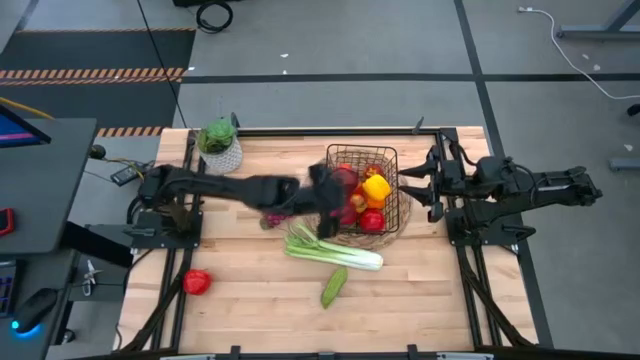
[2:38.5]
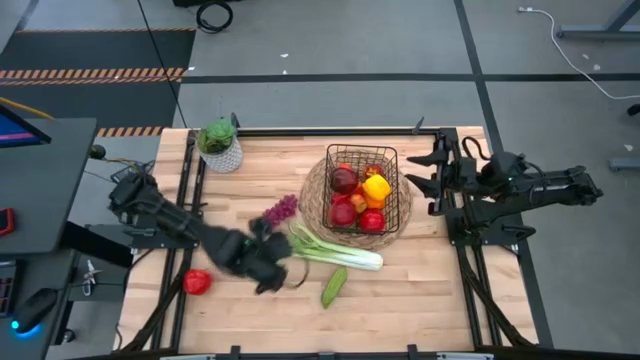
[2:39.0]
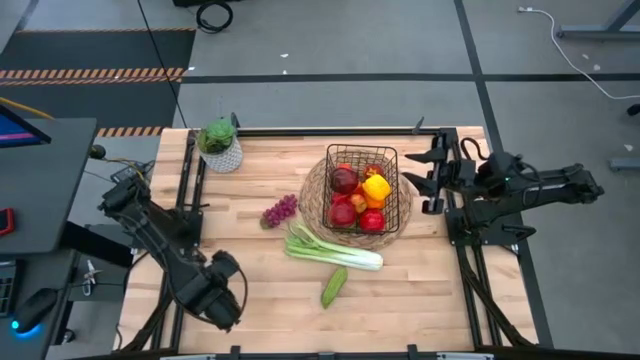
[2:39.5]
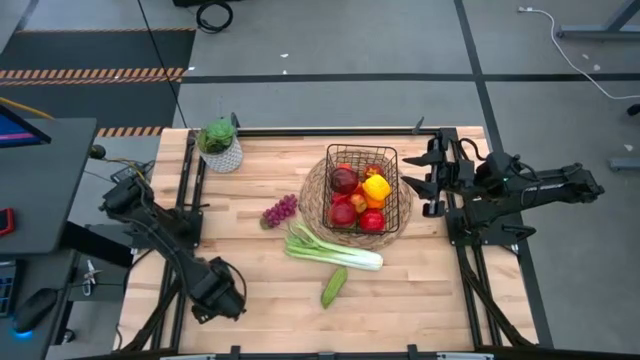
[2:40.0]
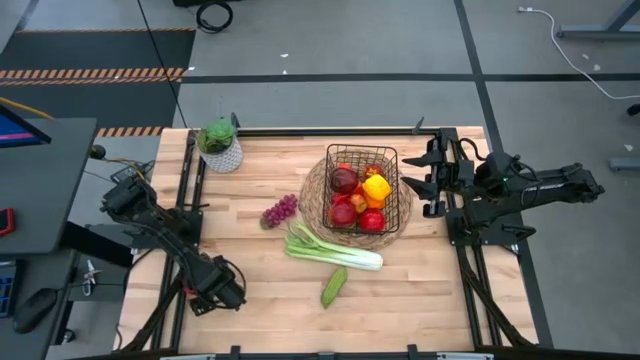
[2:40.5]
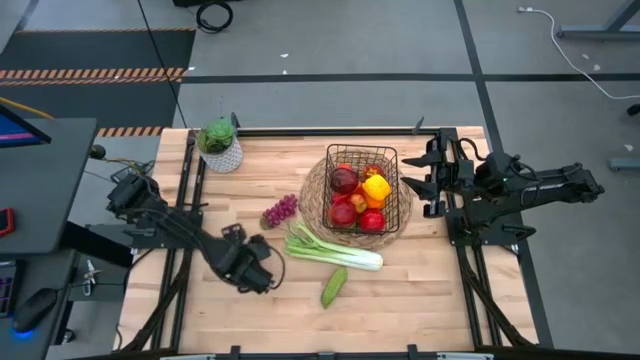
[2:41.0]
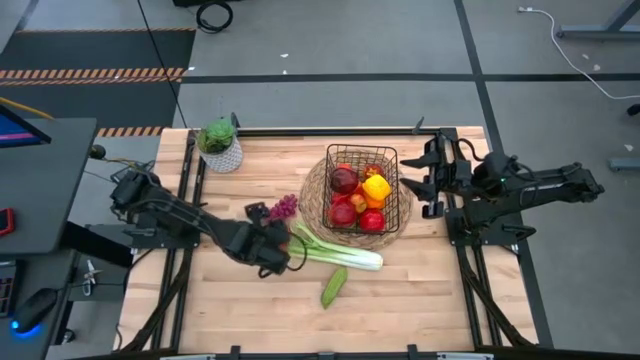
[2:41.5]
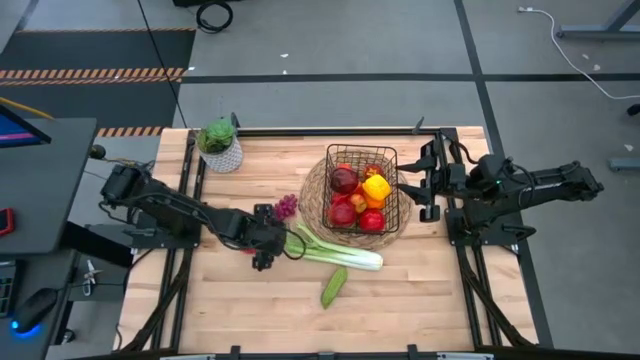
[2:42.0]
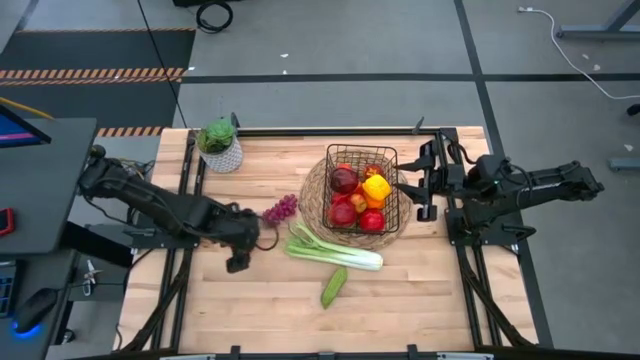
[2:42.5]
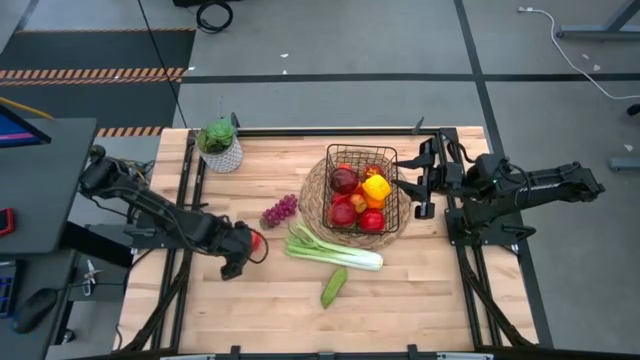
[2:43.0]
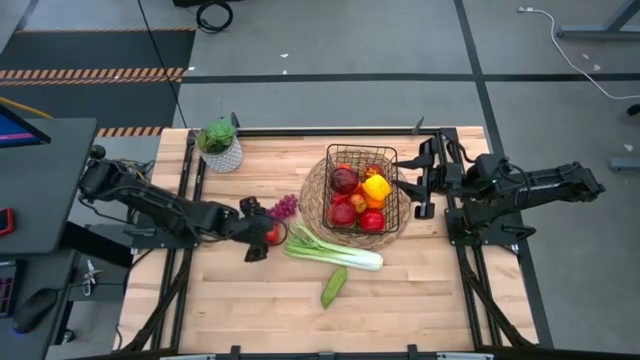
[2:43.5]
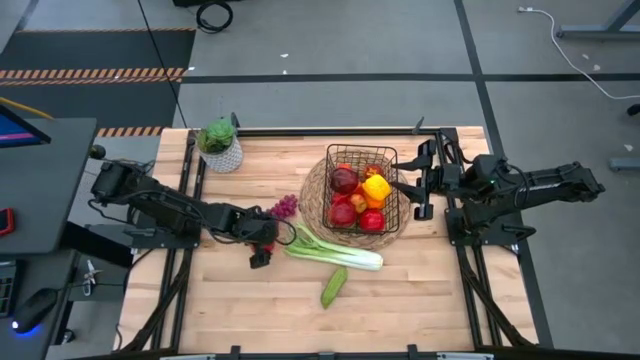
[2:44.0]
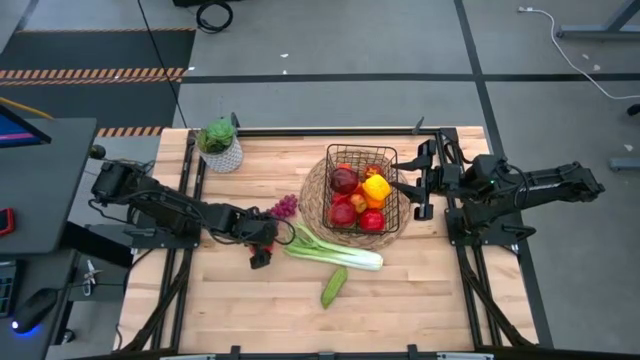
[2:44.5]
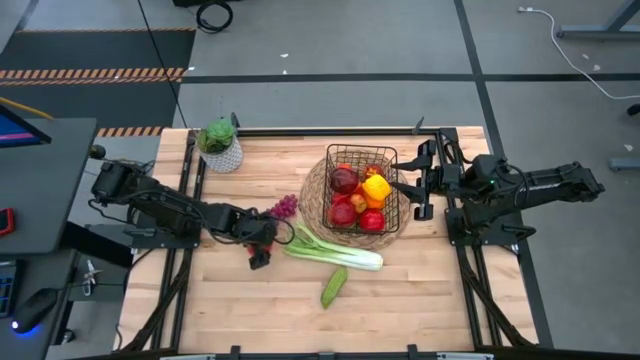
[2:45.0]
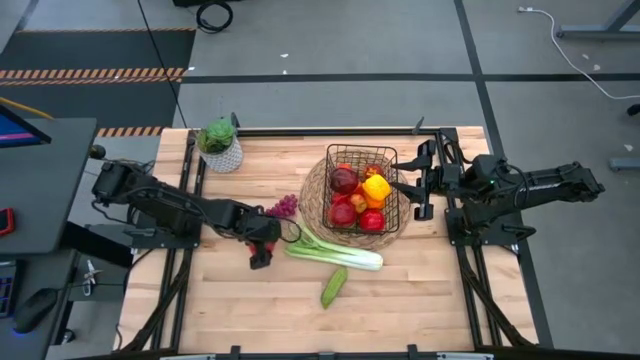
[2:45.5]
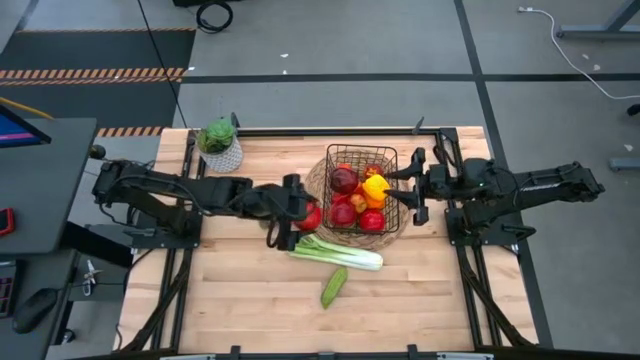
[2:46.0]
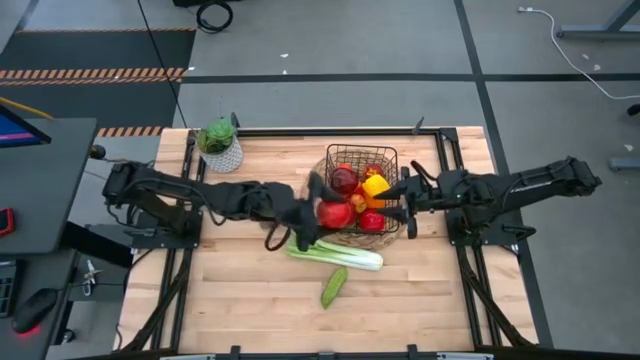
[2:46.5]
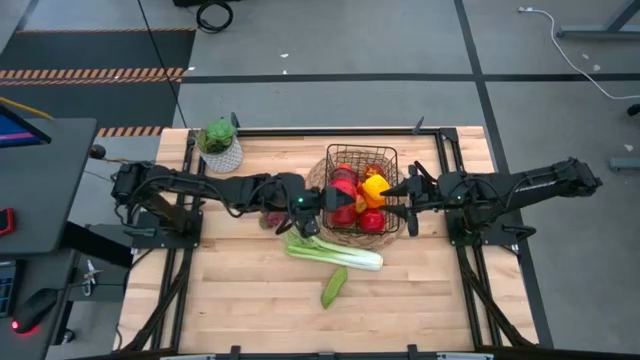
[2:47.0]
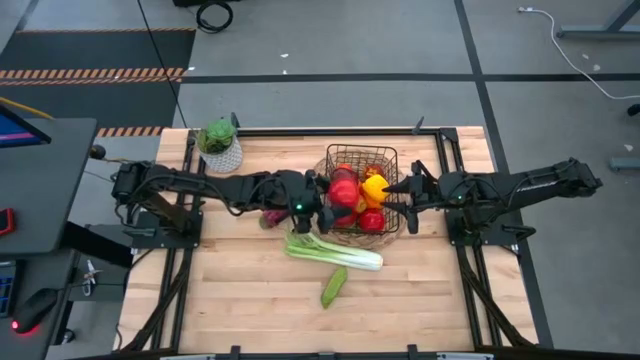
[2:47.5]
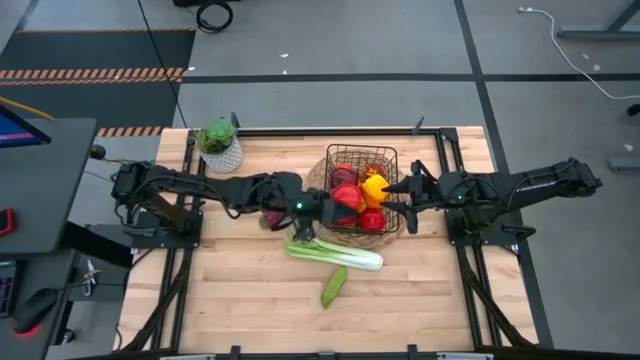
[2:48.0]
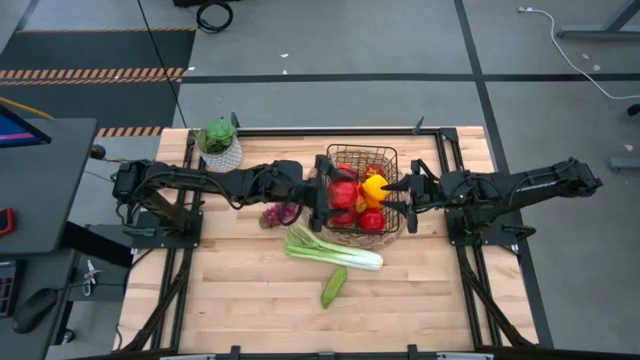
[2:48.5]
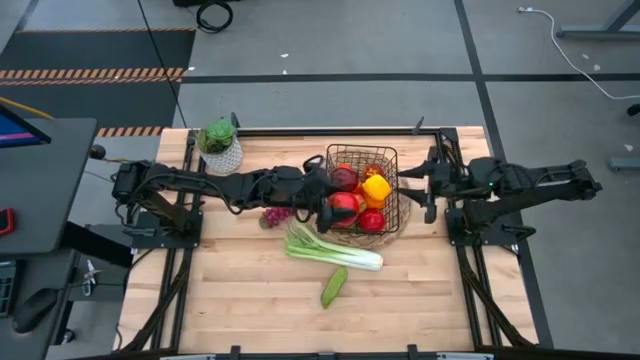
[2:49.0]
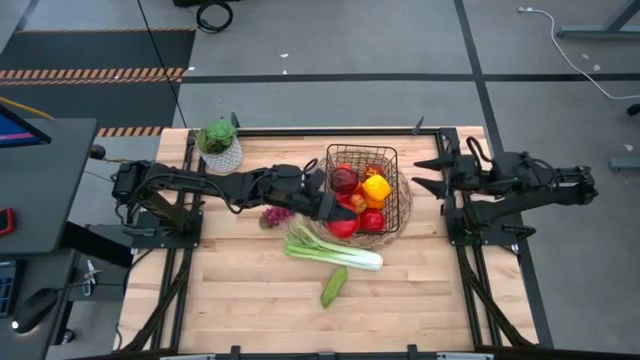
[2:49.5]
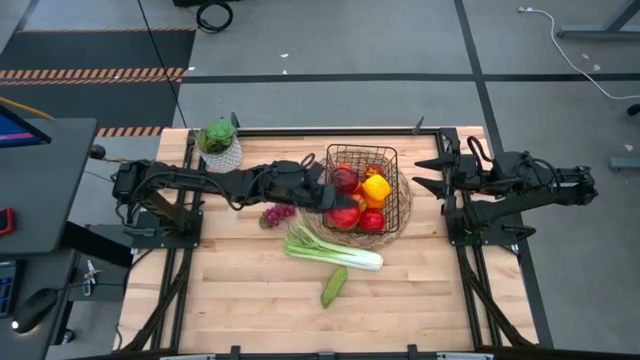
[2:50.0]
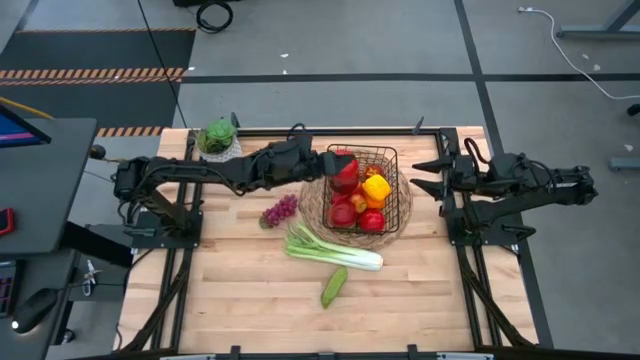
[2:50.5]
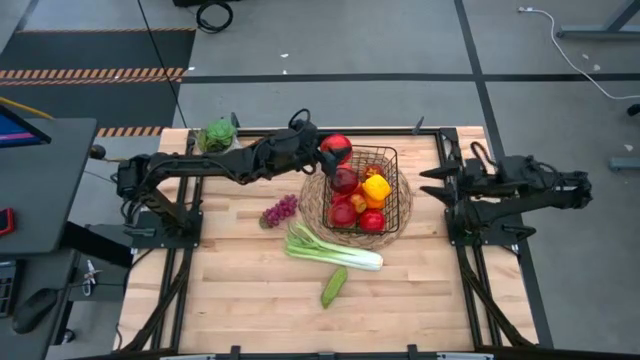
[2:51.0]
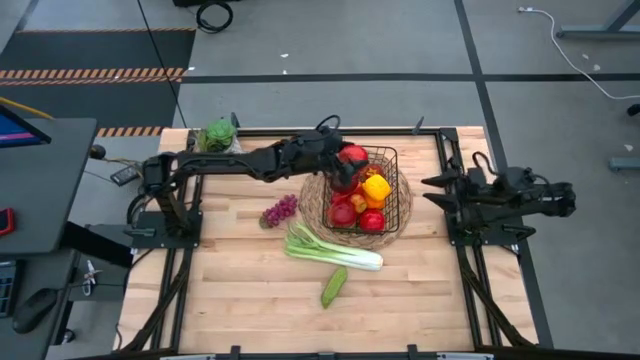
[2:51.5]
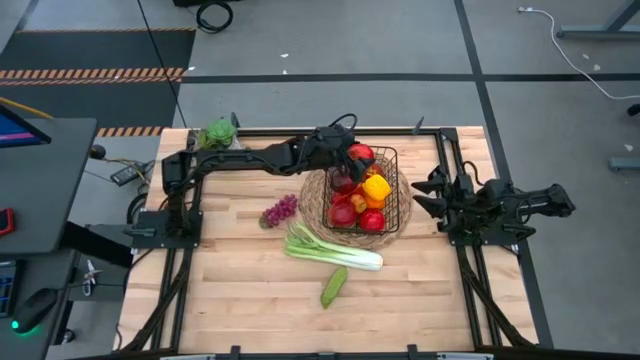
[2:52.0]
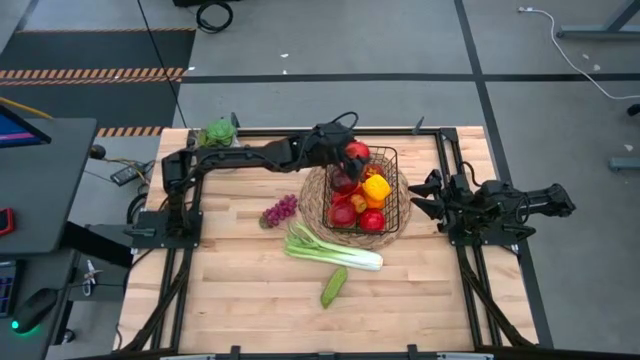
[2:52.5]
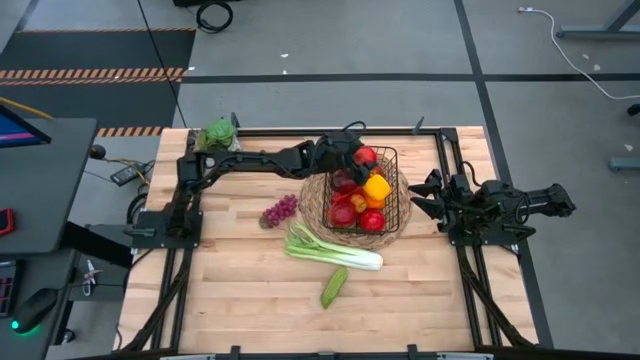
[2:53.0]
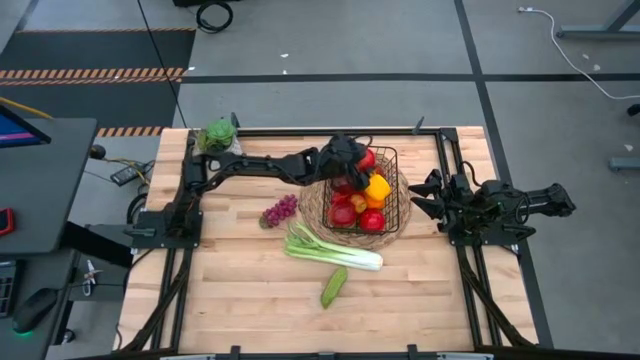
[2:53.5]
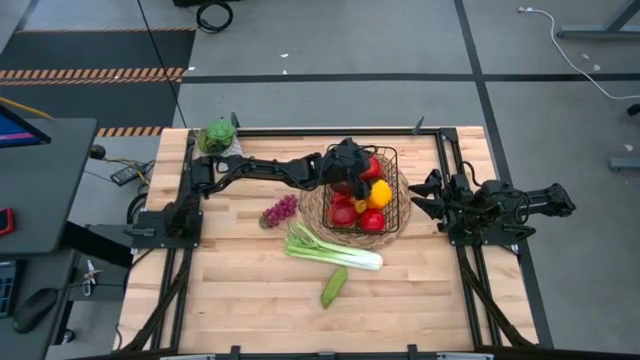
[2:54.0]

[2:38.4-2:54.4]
Task: Build produce basket
Put the apple into the wire basket

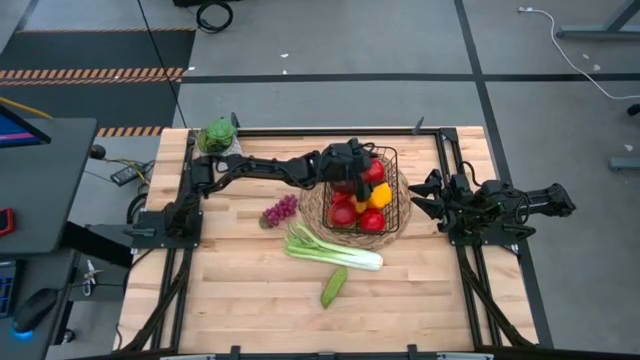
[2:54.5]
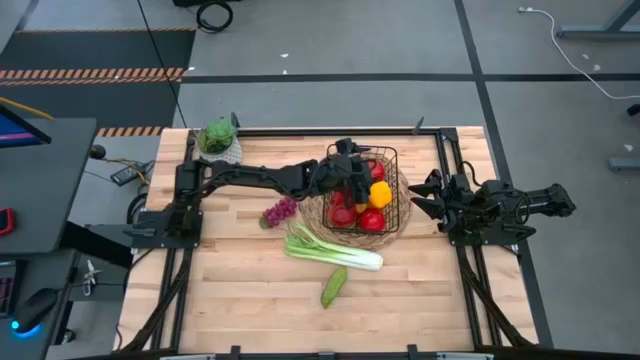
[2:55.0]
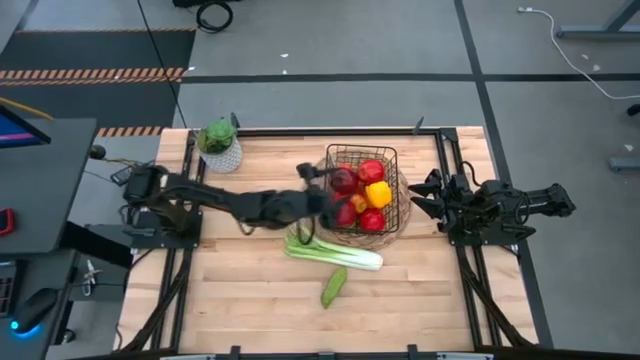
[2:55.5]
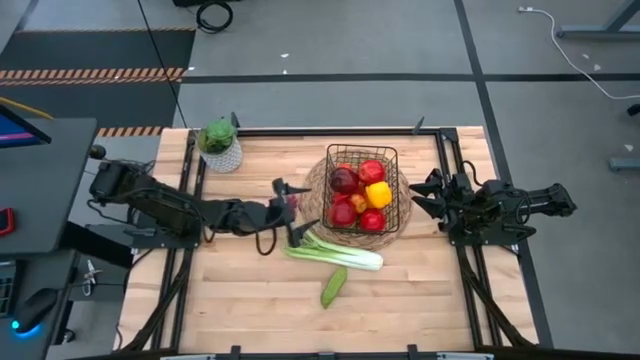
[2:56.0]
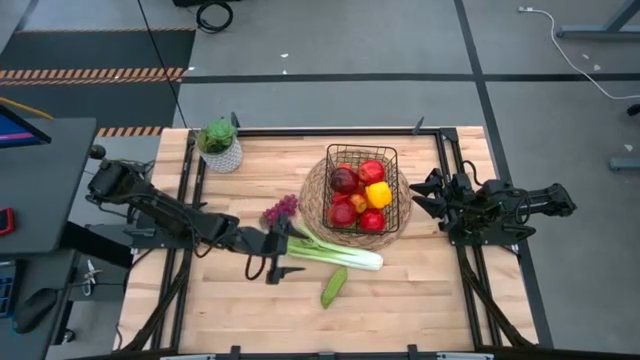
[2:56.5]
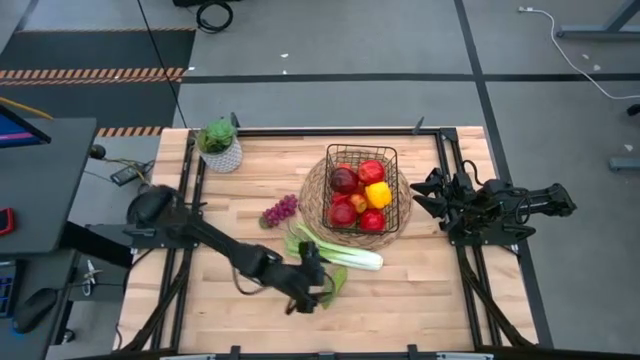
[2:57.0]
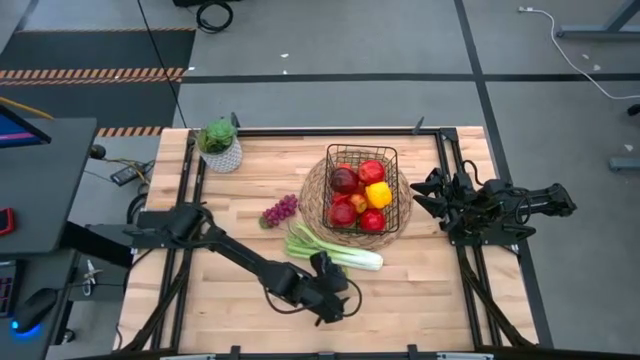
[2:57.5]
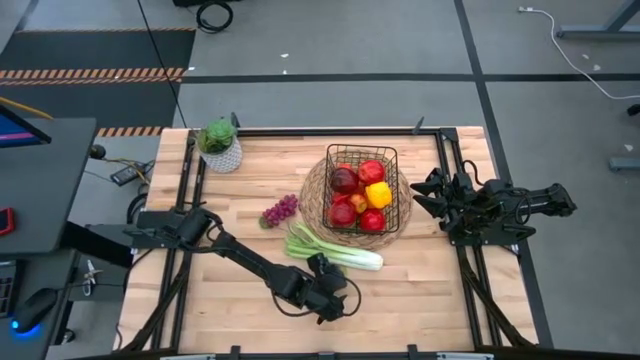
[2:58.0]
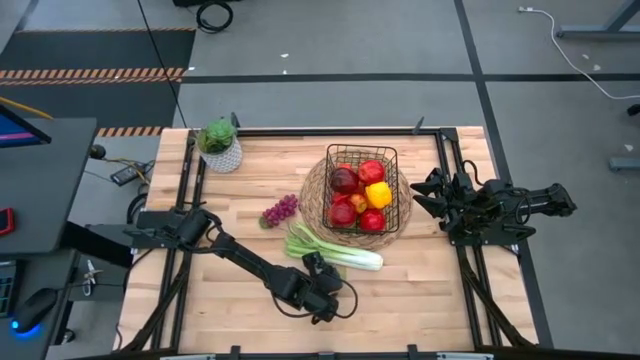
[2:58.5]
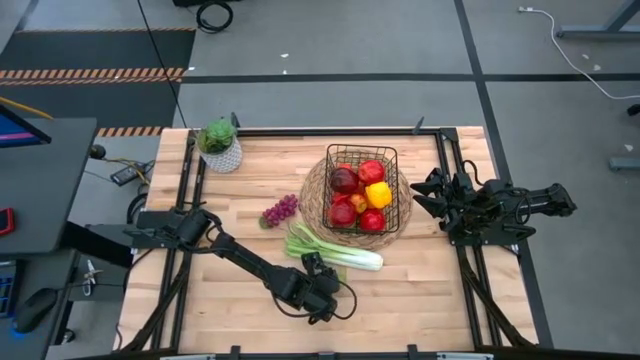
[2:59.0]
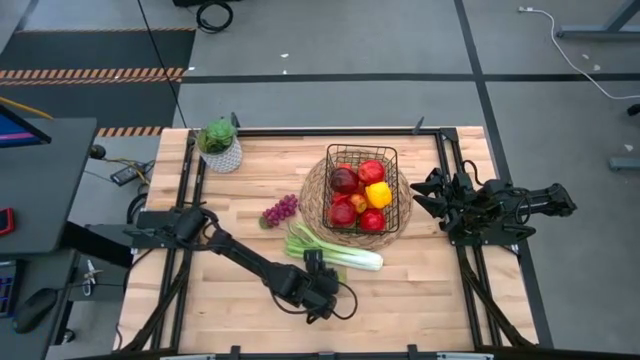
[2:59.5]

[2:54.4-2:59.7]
Put the cucumber into the wire basket
